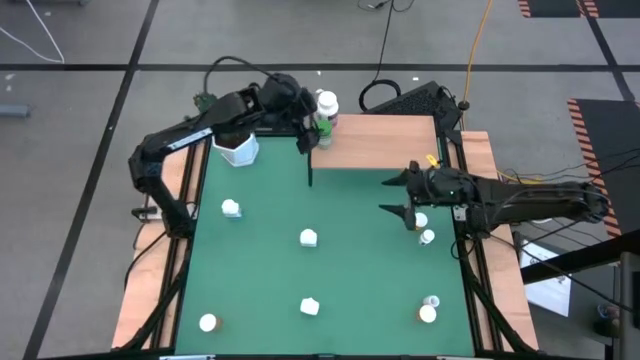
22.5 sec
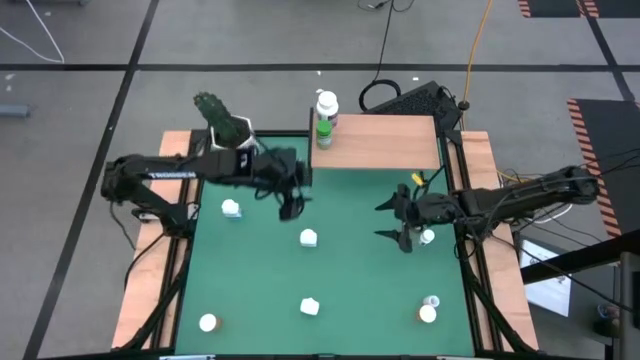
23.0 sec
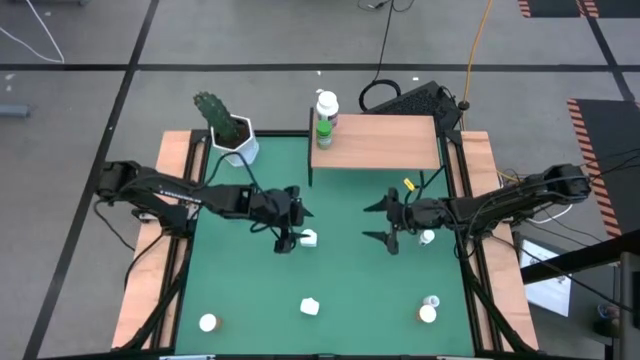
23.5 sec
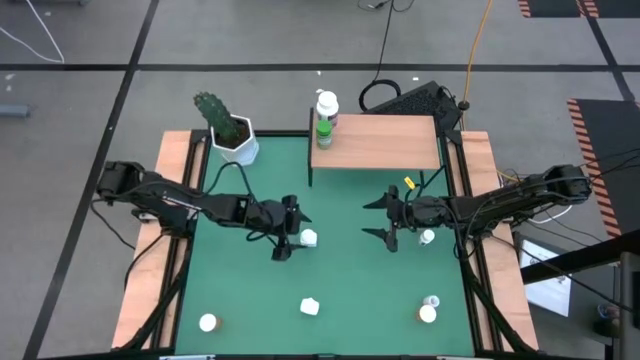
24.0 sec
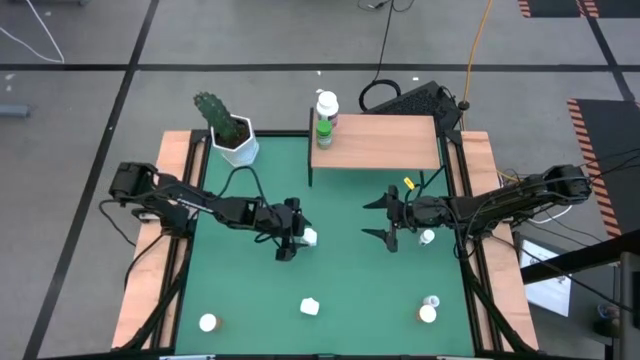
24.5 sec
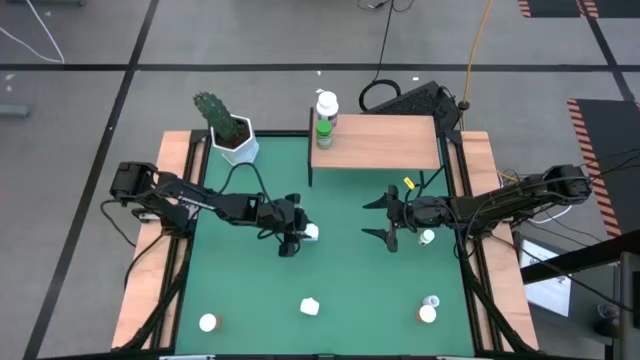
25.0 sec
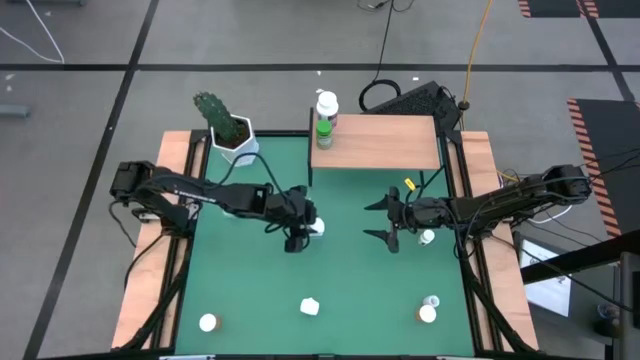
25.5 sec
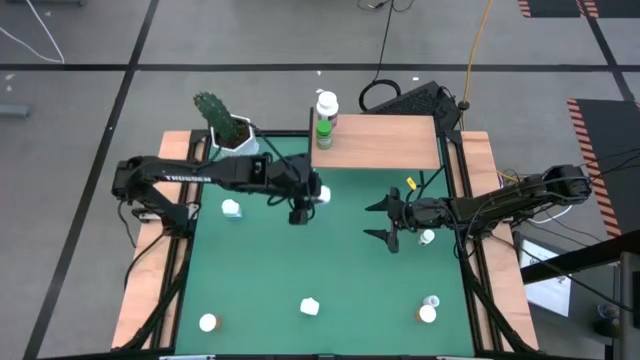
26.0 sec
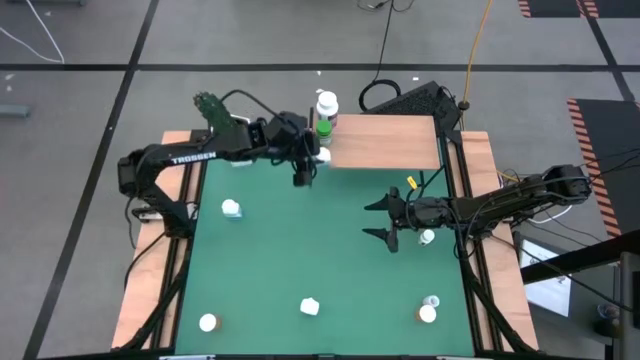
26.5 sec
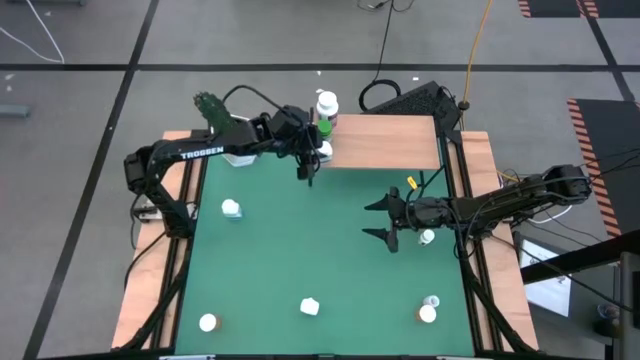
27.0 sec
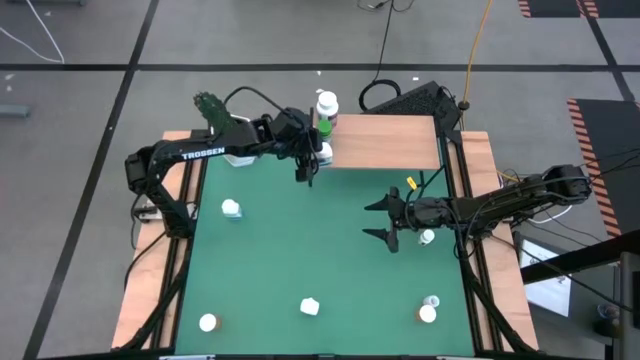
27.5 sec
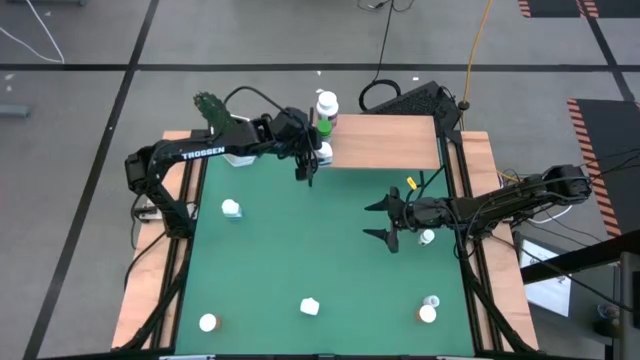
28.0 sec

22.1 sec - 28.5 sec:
Task: Pick and place medicine bottles onto shelf by color
Put the middle blue pill bottle on the shelf

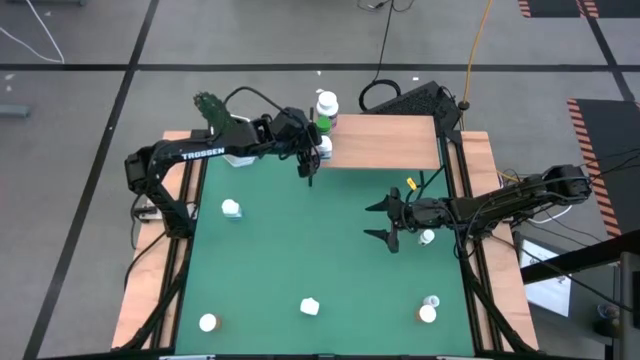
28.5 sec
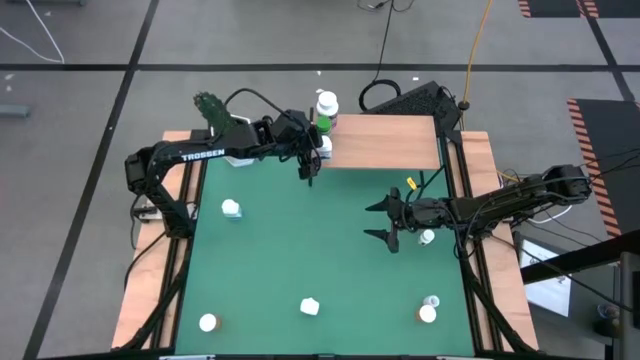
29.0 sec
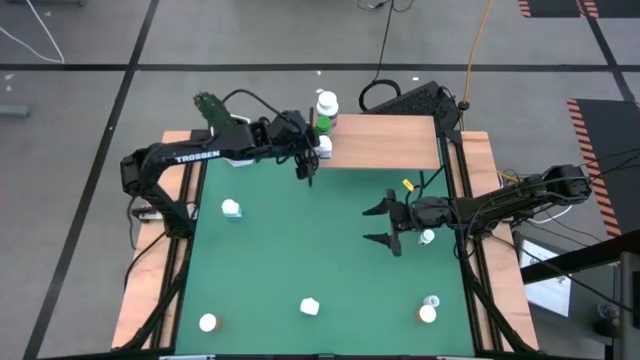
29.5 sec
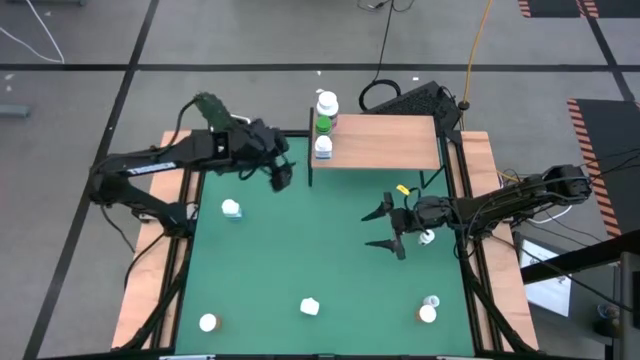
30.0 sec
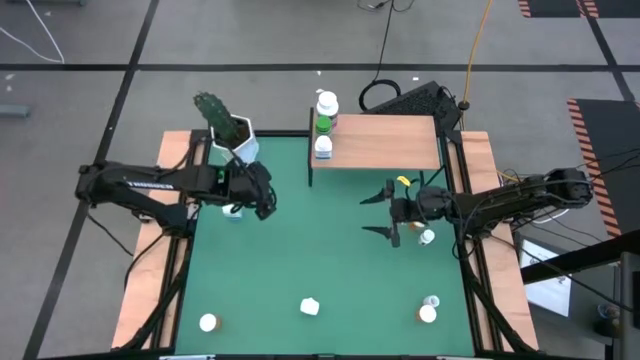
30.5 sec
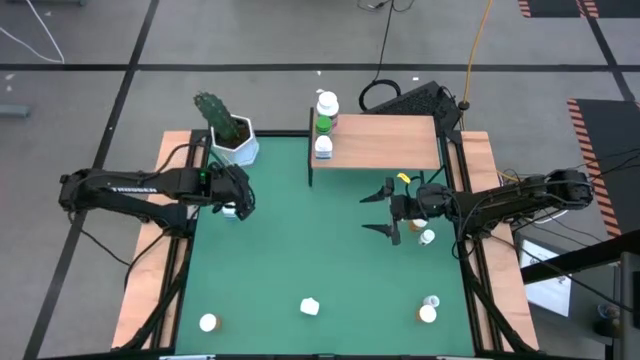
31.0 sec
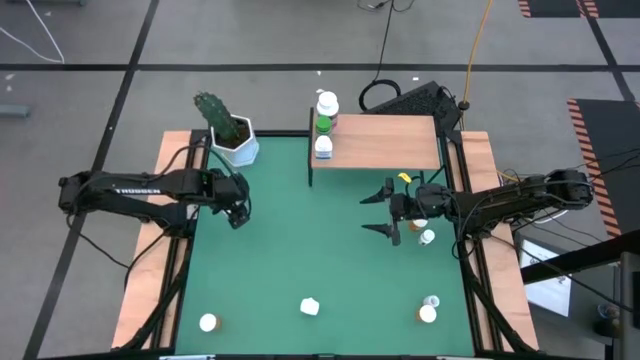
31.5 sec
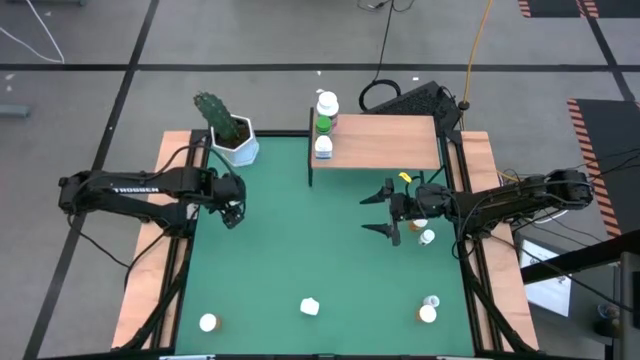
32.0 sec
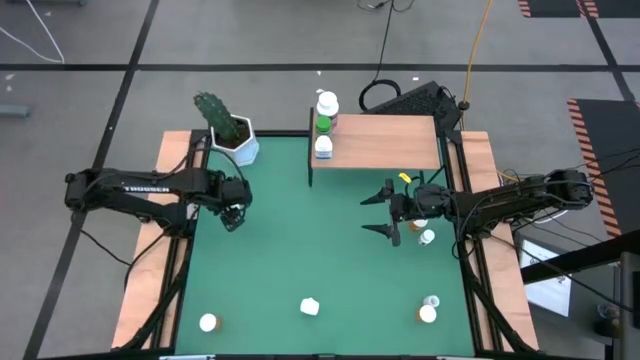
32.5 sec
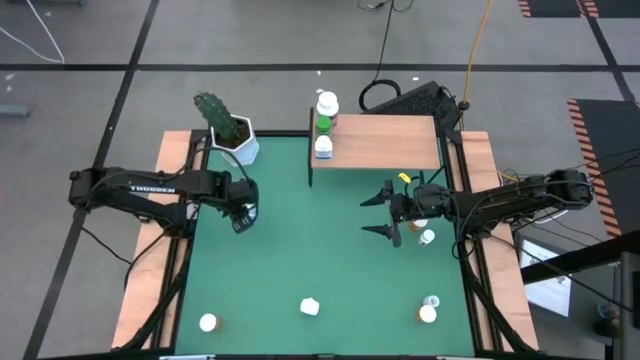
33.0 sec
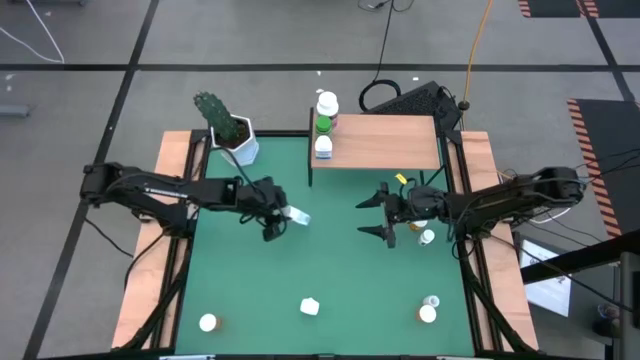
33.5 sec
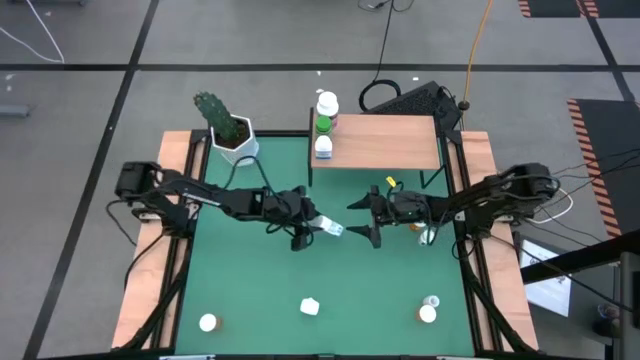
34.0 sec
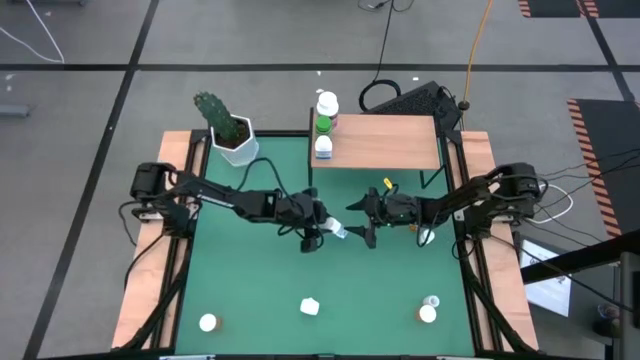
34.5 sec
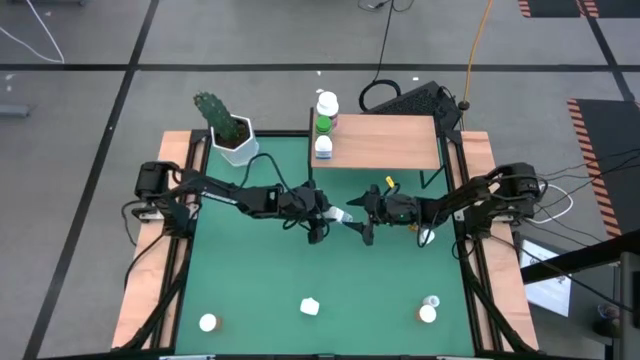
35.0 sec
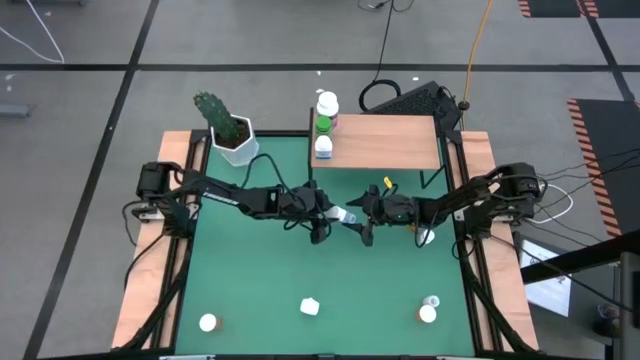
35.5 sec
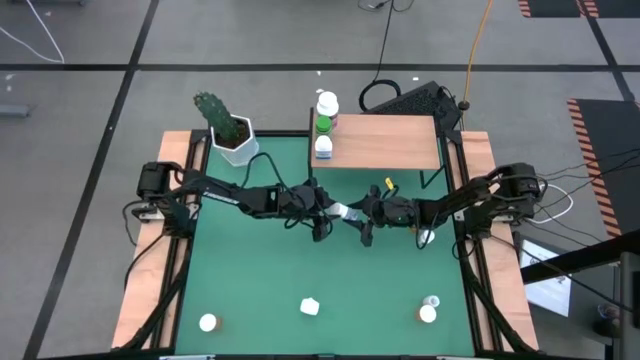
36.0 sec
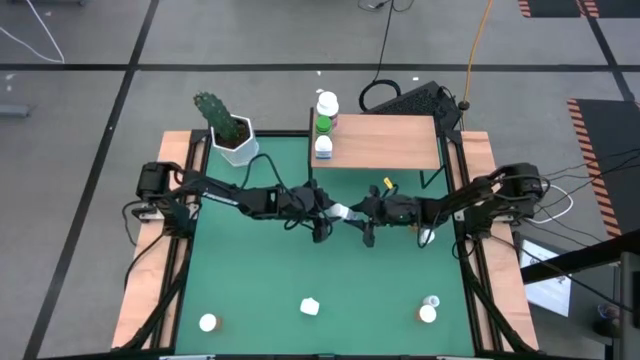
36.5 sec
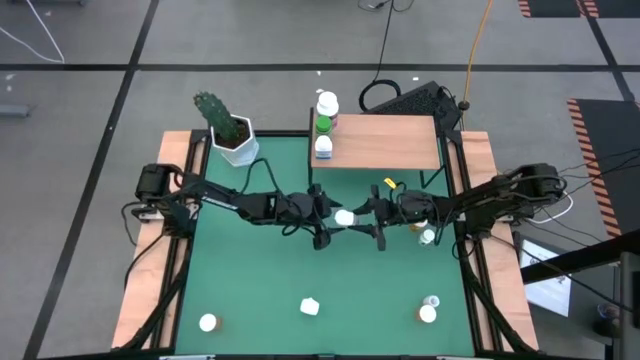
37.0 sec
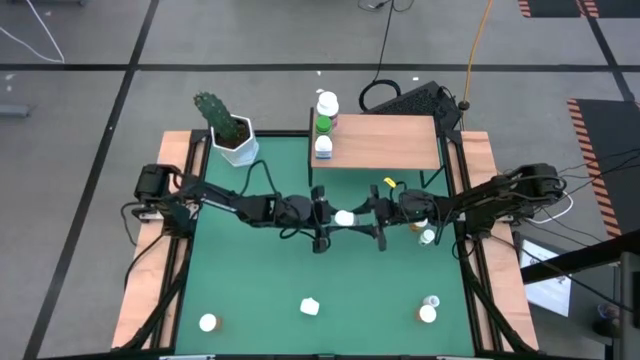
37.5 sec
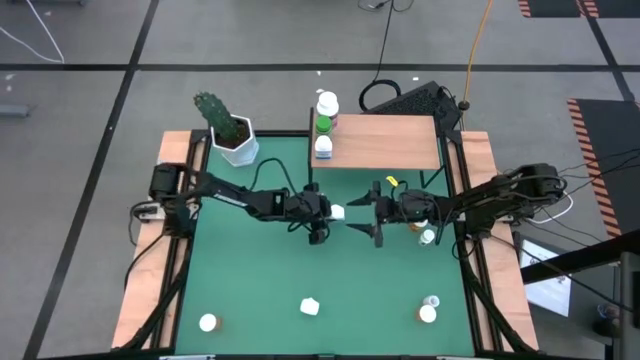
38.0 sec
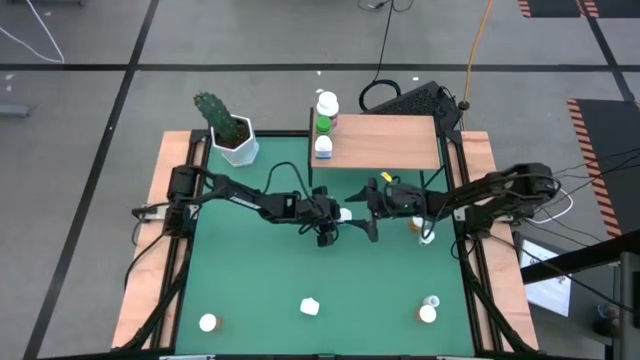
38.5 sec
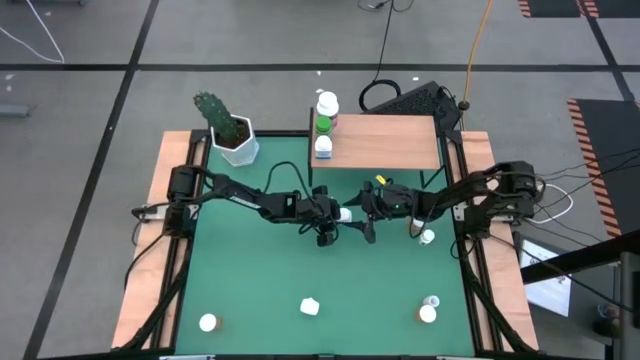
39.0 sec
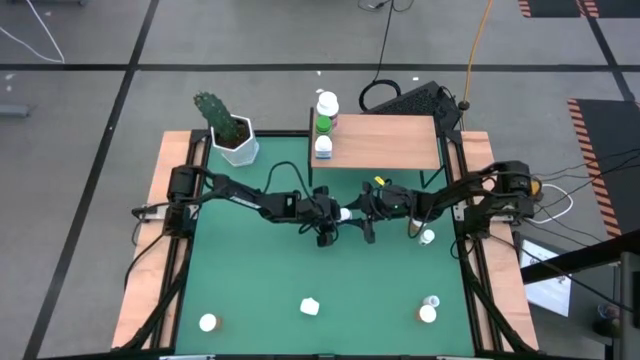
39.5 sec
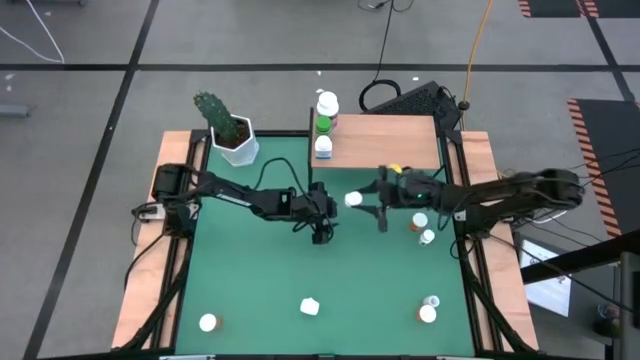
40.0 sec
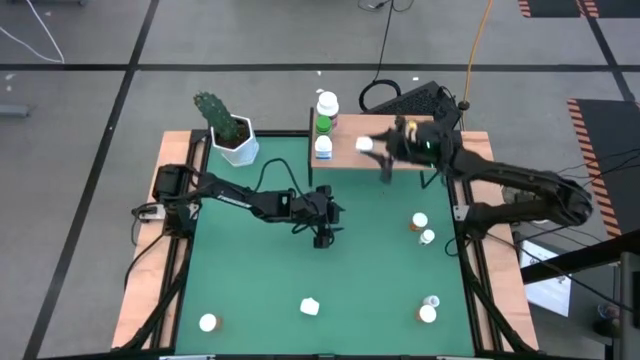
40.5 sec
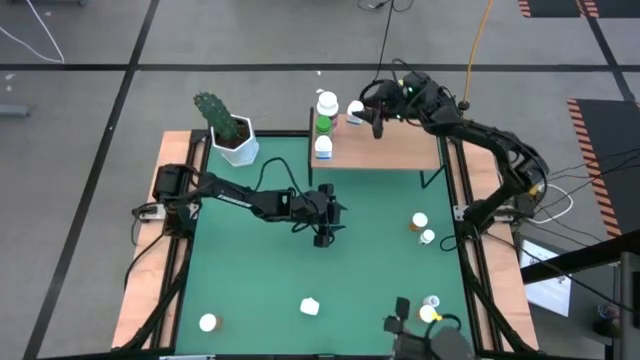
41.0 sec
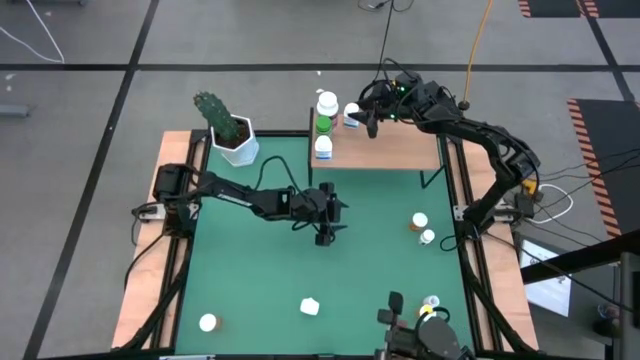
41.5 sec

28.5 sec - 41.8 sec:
Put the top blue pill bottle on the shelf

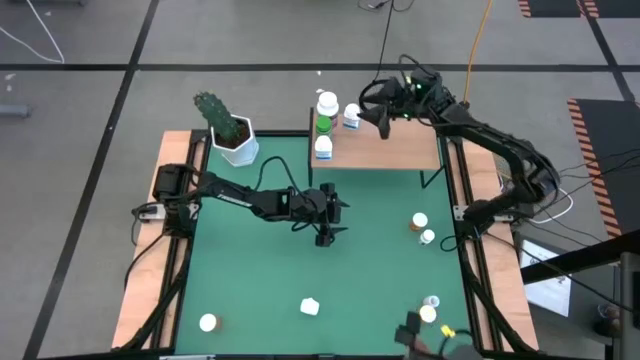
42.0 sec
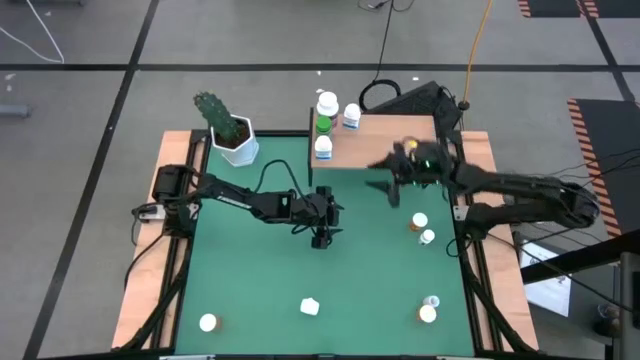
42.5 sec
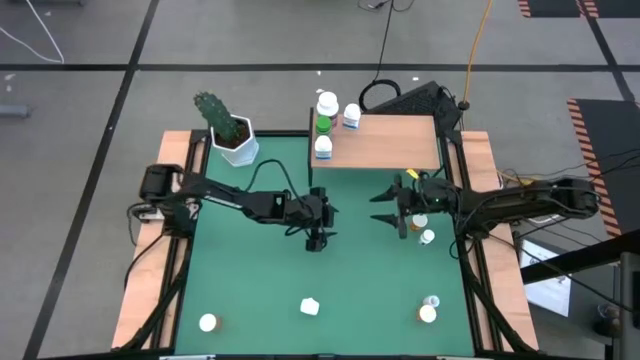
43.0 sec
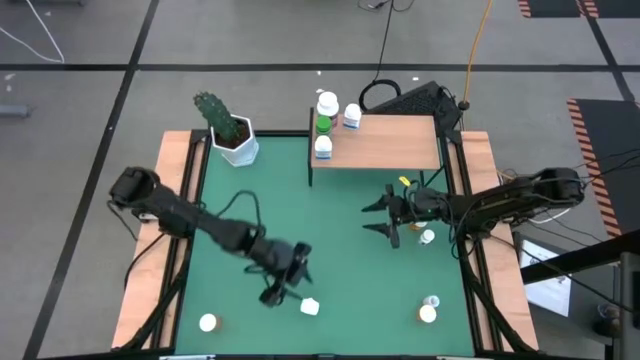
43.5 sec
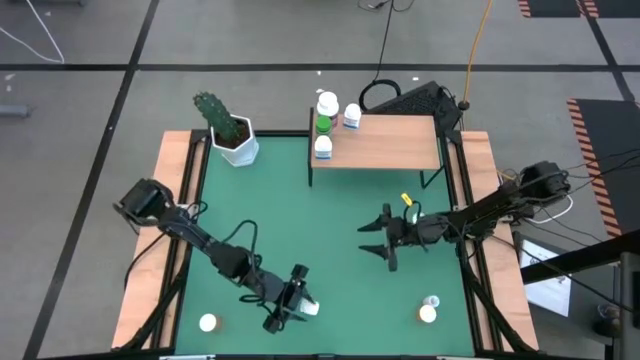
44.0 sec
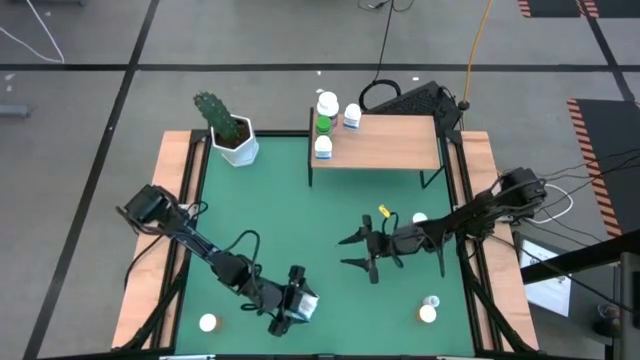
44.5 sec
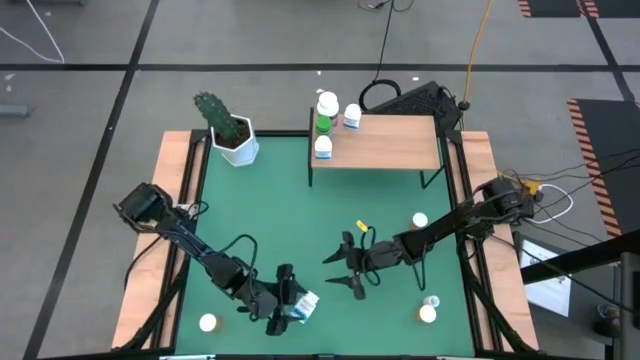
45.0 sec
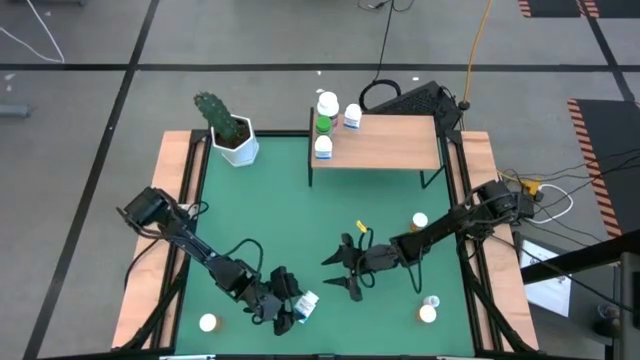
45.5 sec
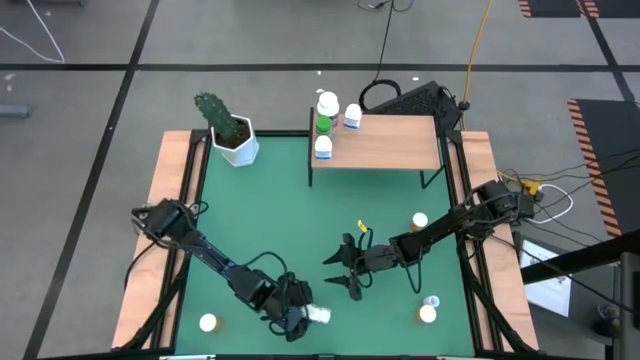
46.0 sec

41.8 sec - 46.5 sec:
Put the blue pill bottle on the shelf
